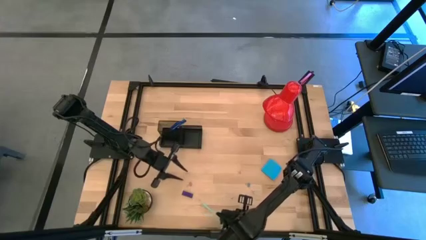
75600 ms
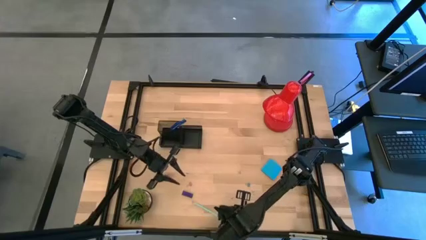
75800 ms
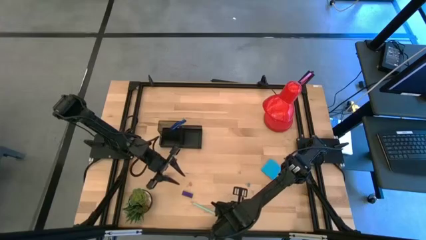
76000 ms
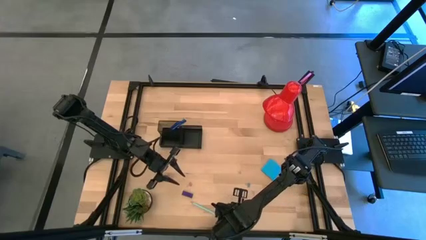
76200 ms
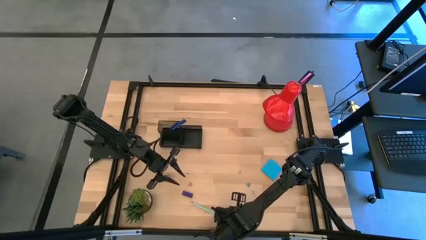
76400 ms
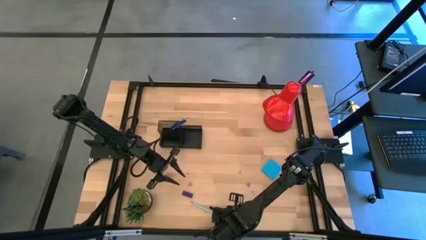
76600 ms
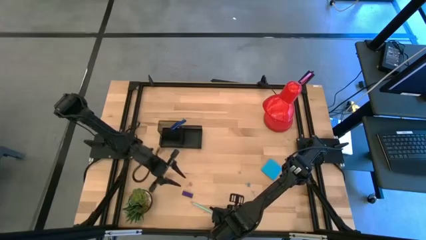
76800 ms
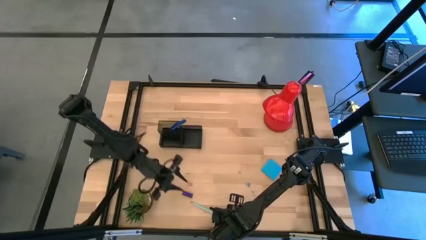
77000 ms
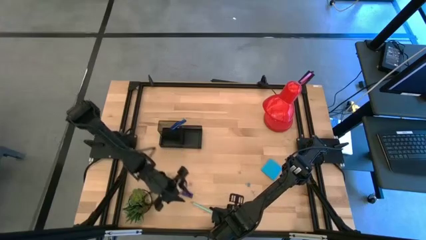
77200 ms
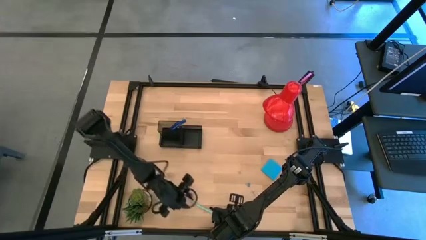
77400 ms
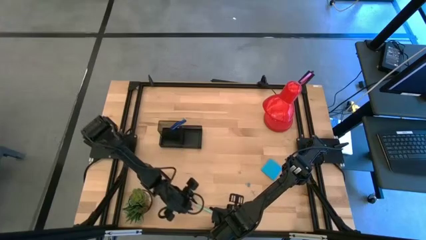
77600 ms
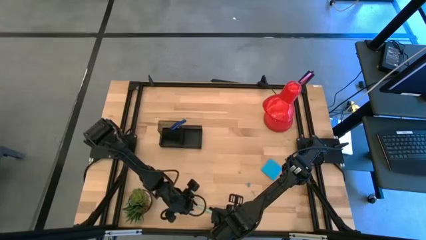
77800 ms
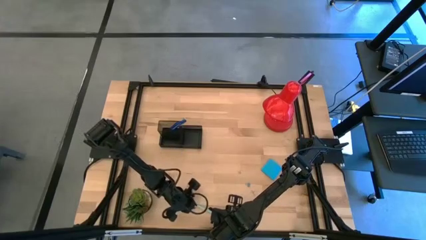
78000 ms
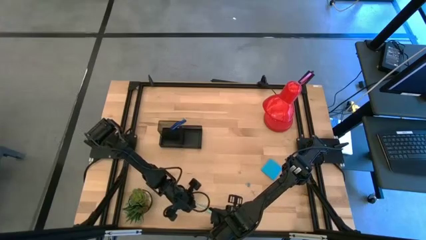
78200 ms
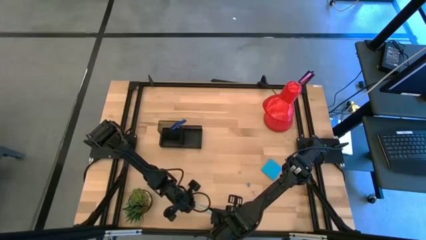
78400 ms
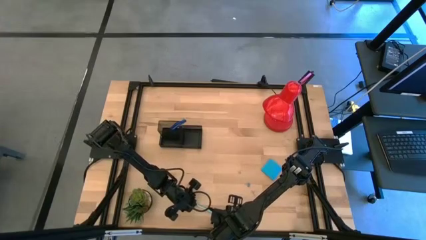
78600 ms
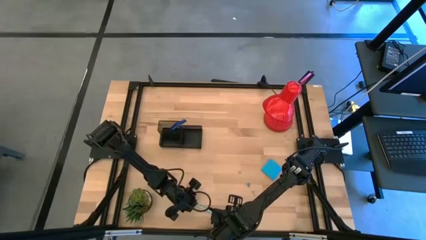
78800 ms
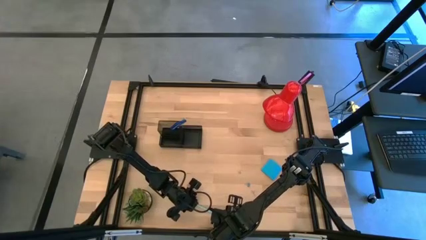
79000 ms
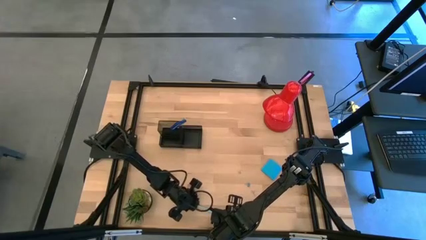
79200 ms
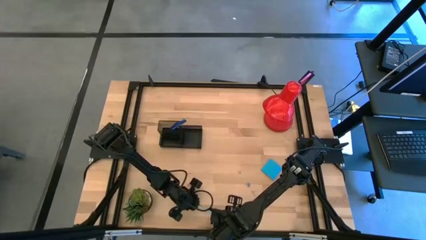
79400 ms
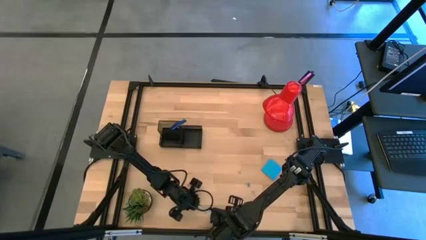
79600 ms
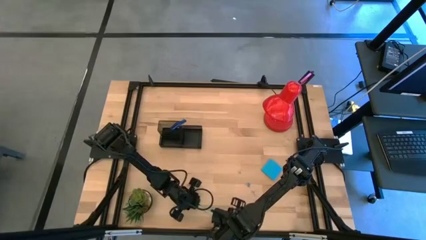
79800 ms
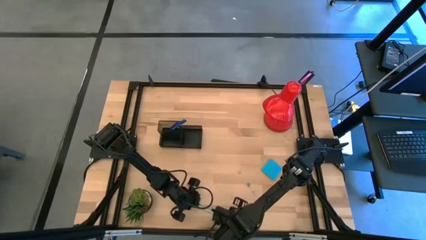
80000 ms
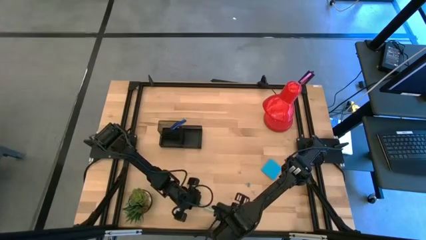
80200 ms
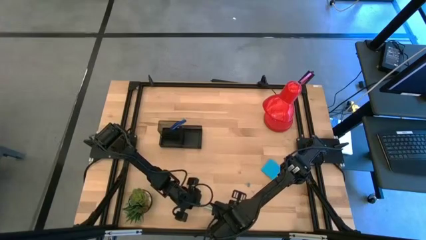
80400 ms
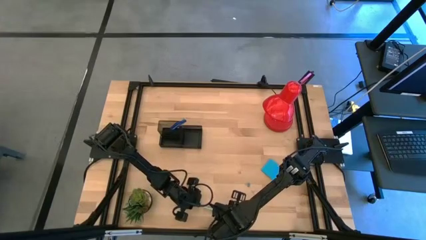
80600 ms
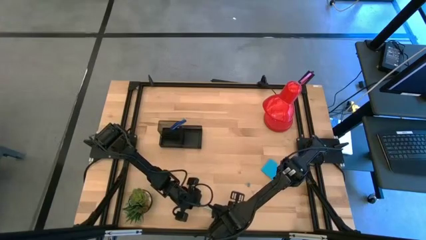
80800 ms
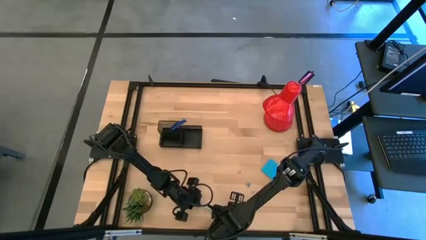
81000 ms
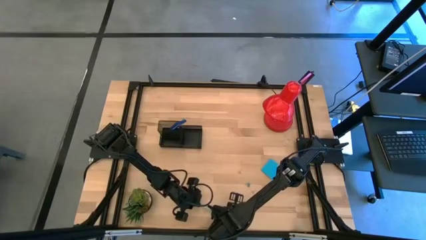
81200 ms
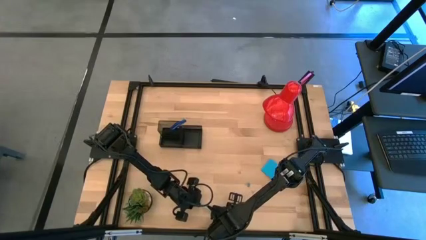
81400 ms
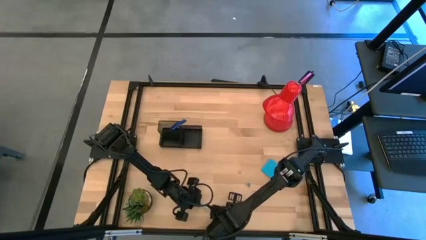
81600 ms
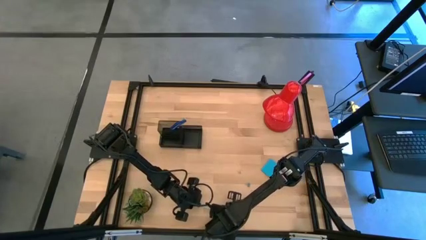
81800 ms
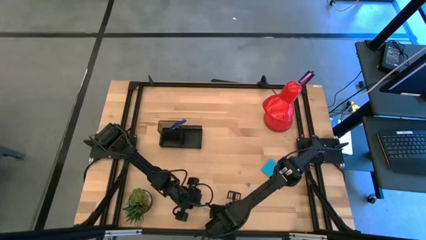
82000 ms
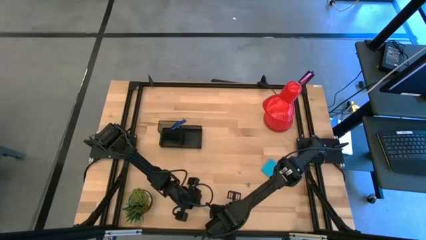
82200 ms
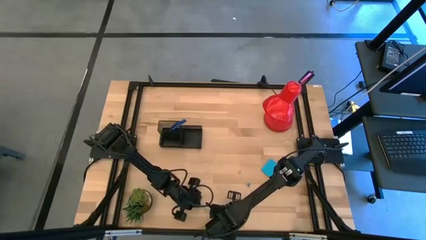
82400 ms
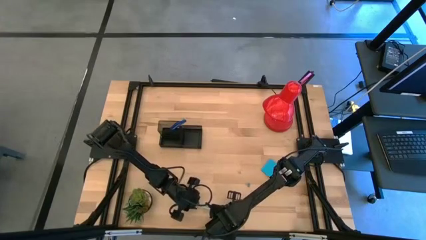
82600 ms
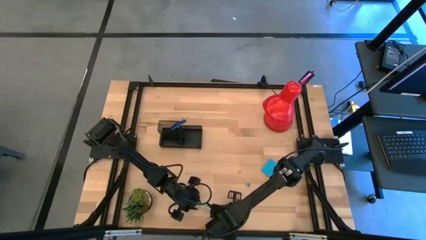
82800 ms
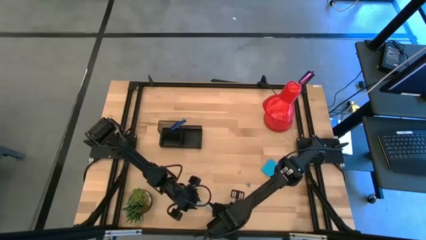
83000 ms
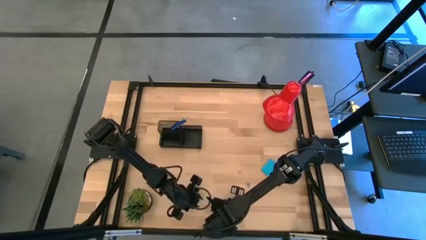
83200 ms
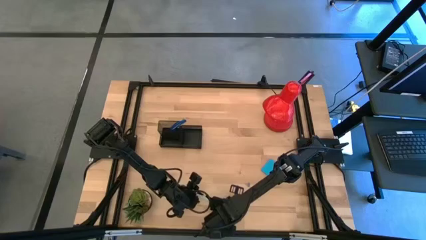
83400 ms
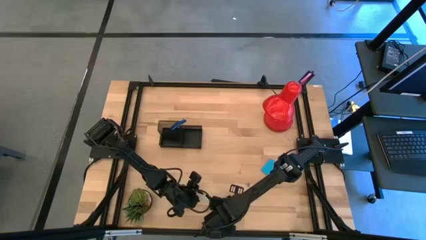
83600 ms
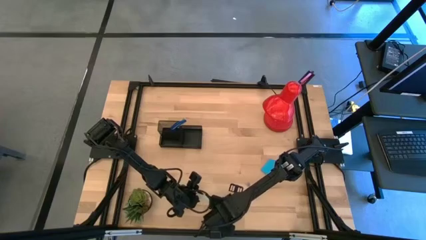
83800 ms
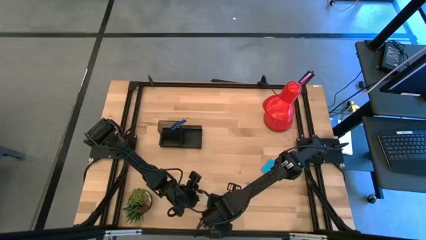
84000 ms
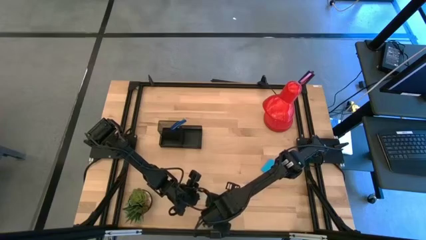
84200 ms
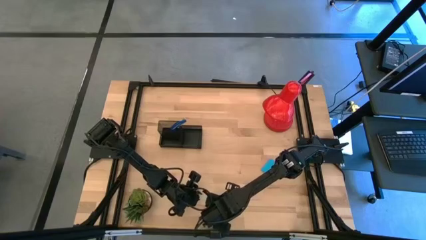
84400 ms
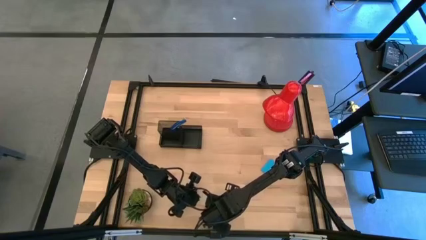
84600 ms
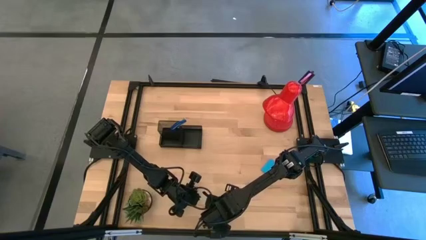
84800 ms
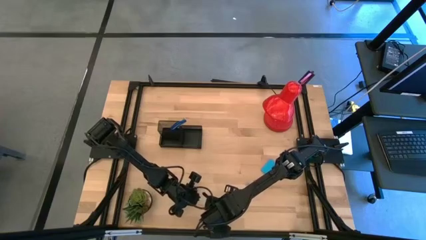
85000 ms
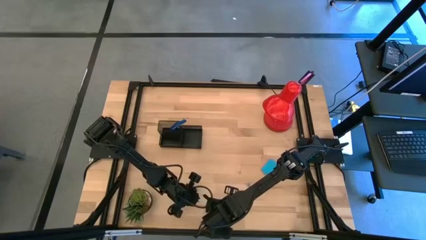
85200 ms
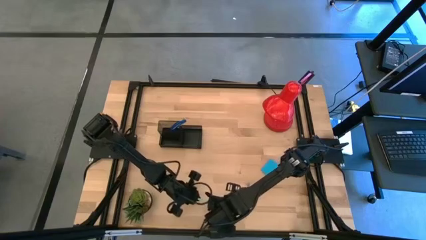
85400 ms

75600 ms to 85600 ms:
Task: Pick and place office supplies into organizer
Put the blue pencil into the black desk organizer
